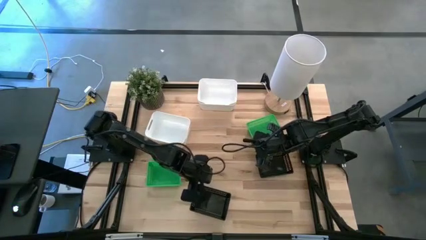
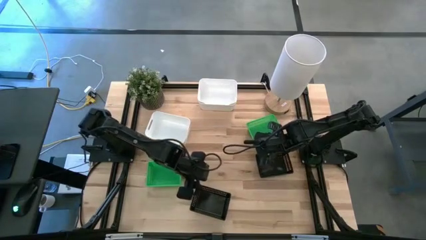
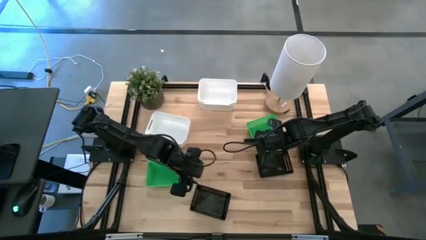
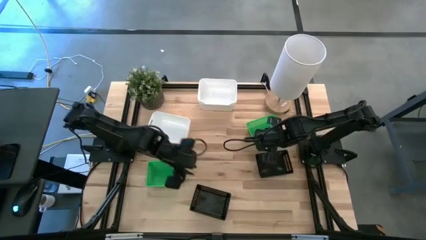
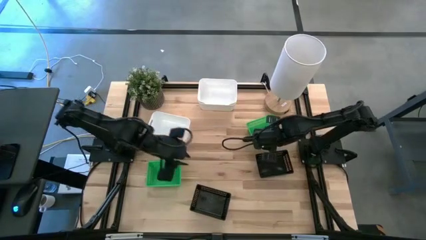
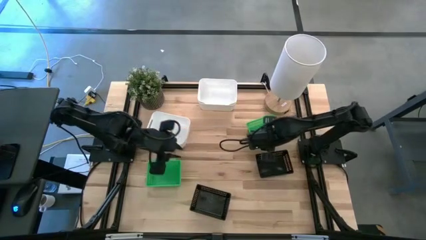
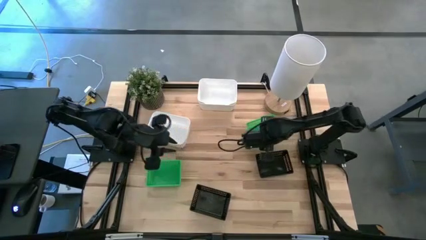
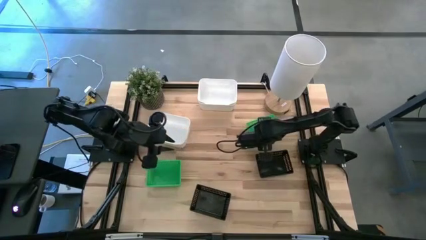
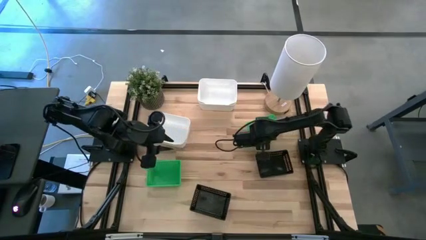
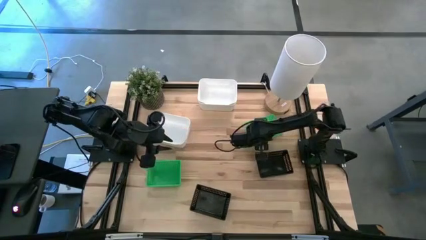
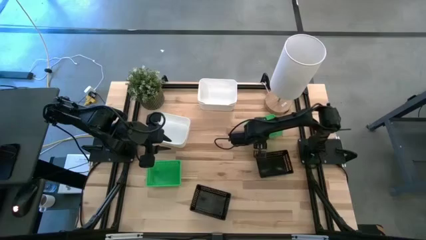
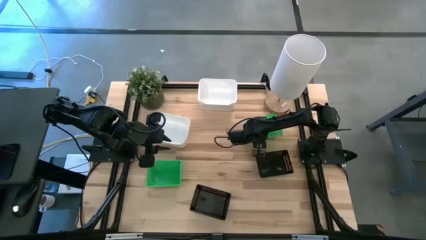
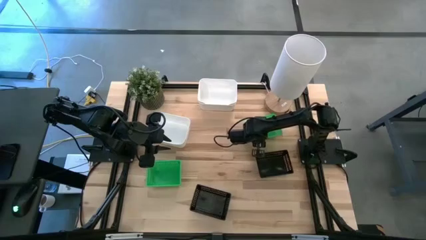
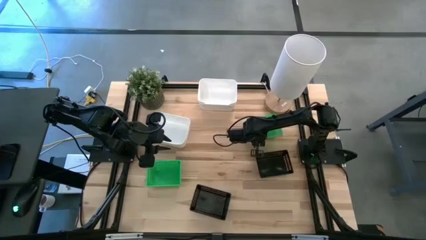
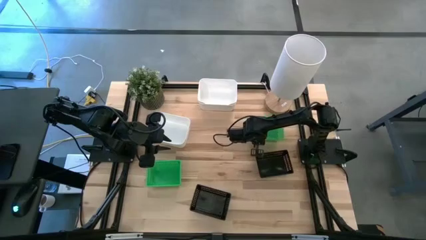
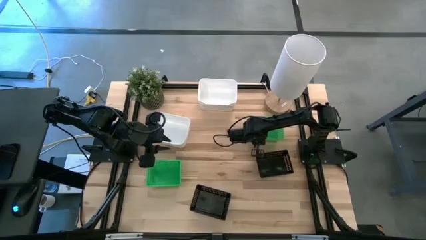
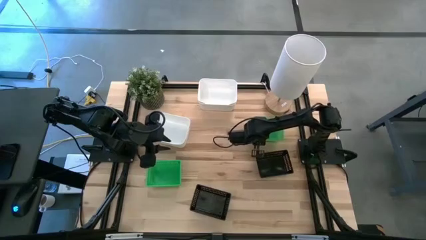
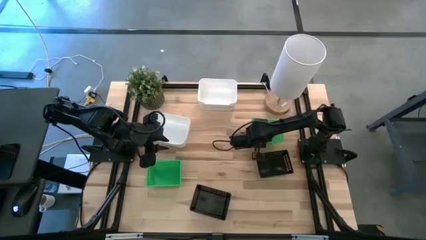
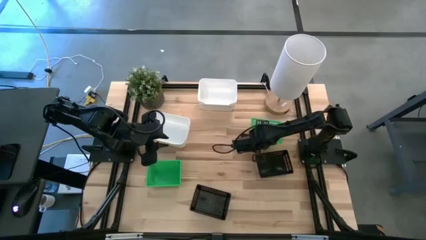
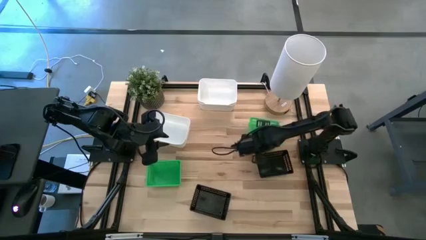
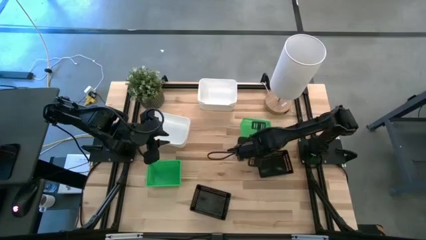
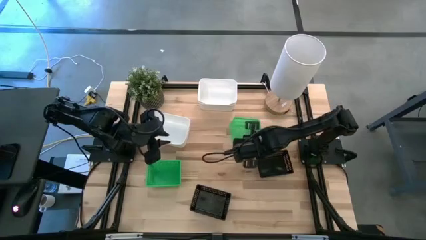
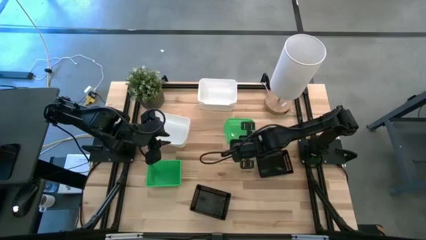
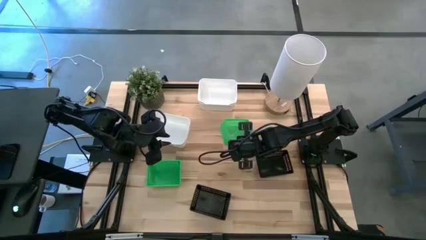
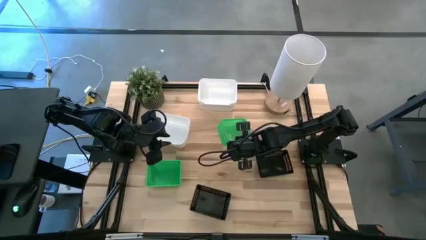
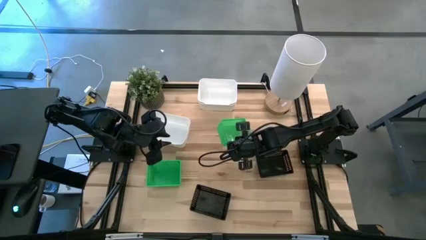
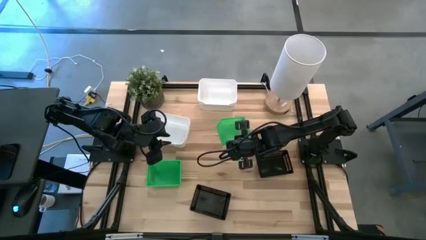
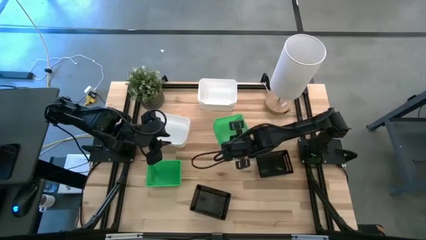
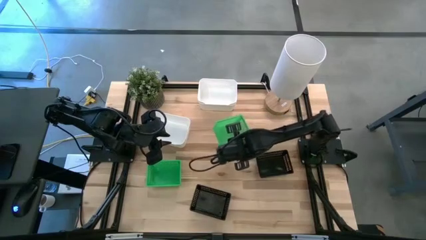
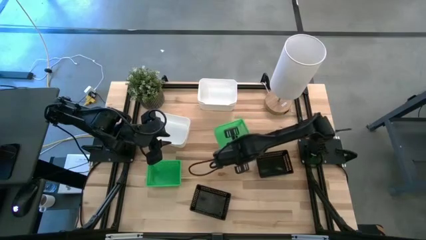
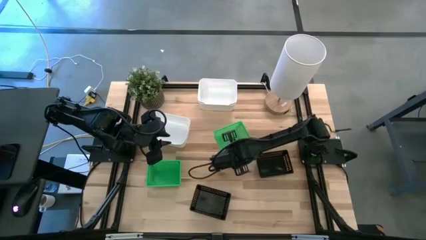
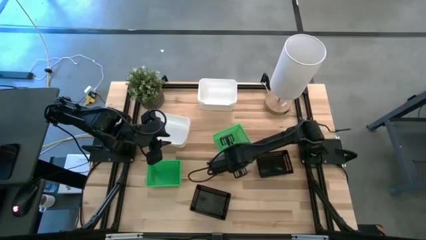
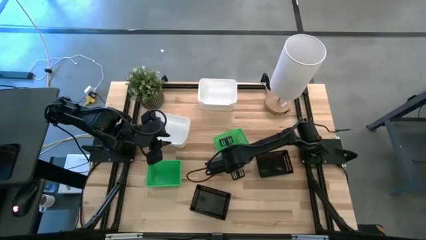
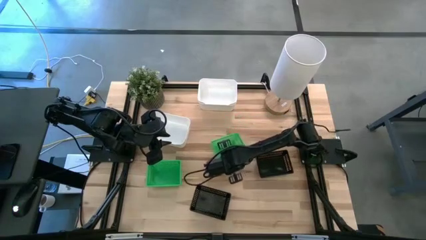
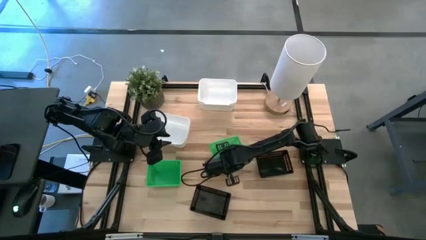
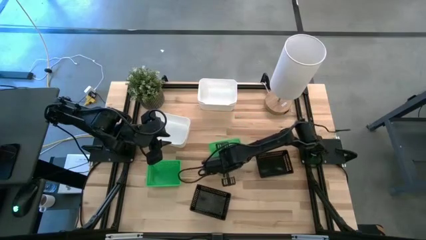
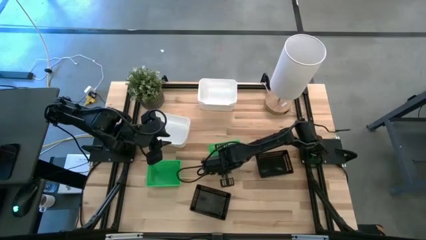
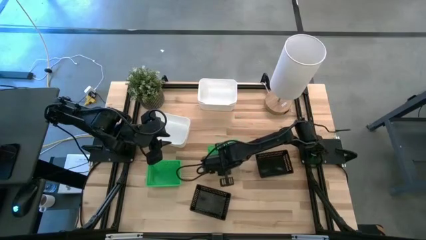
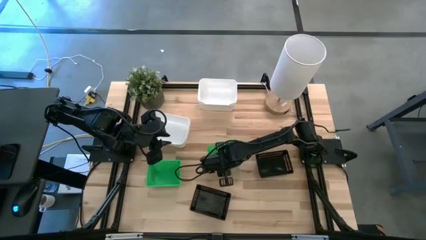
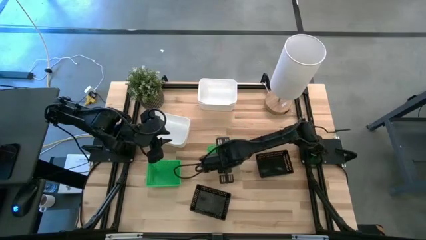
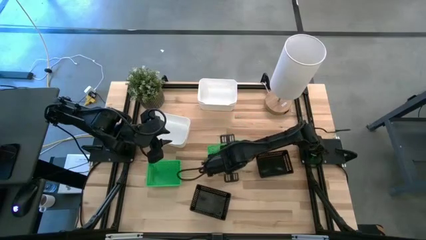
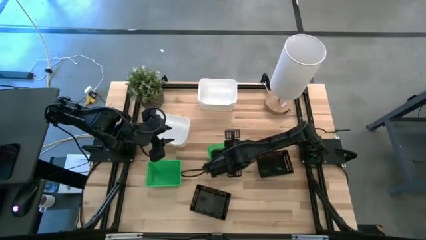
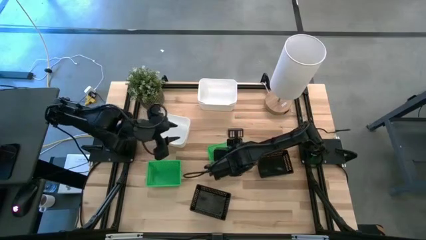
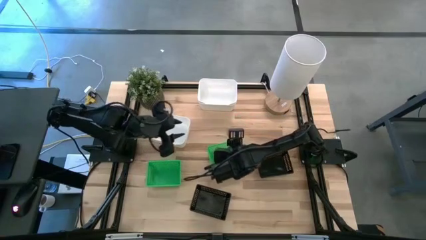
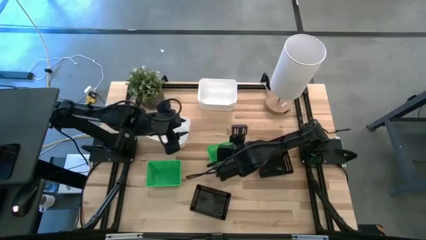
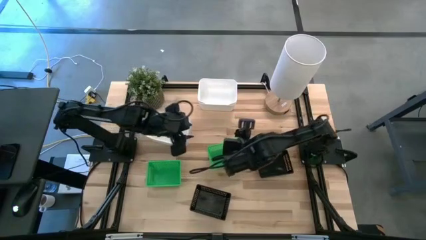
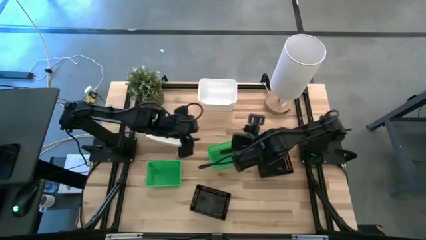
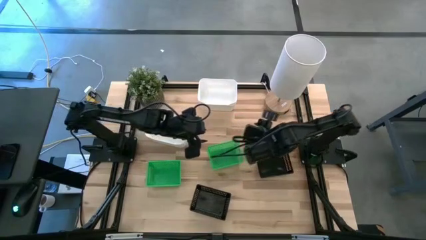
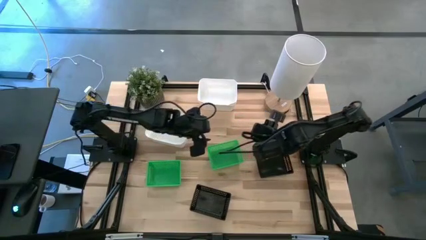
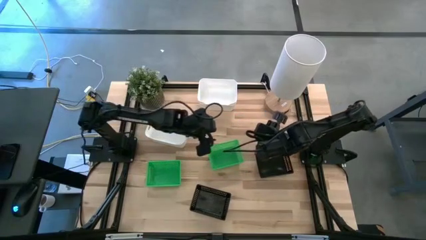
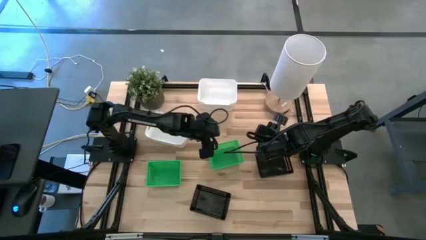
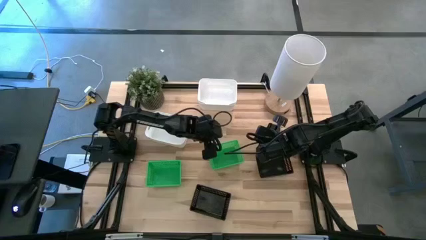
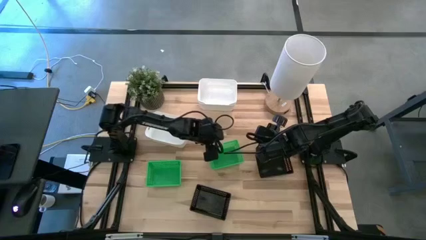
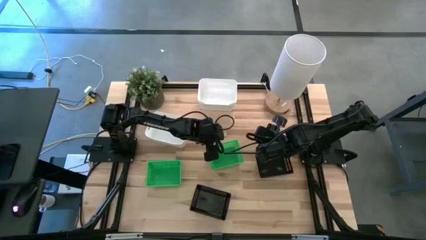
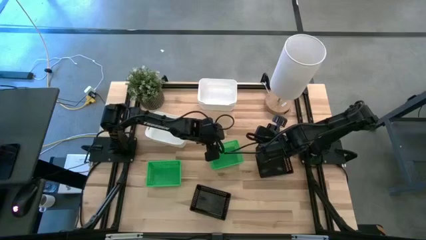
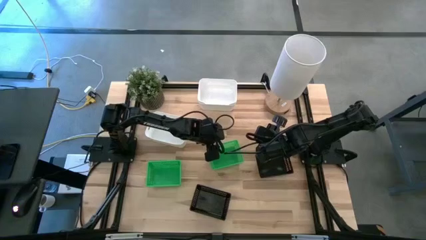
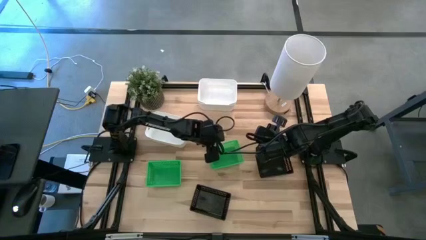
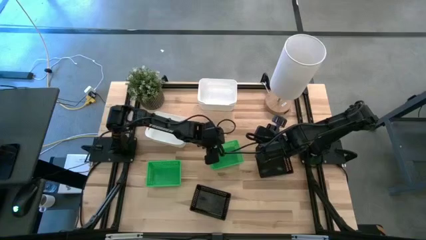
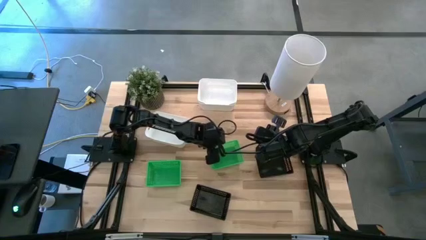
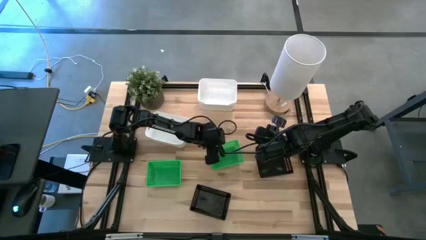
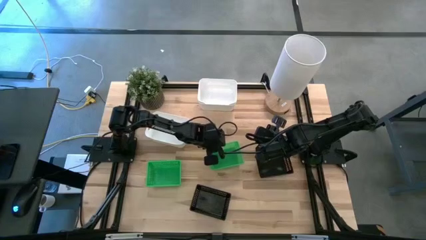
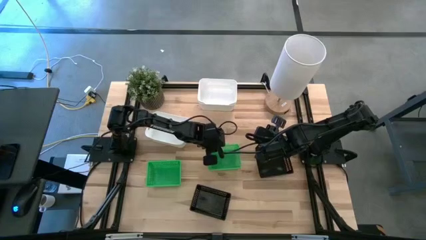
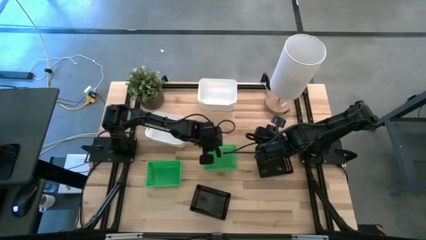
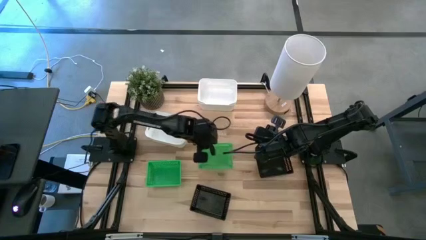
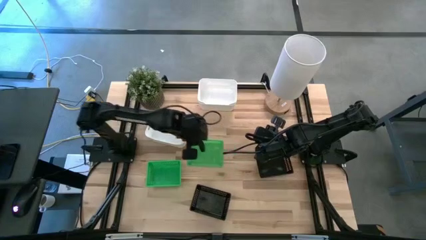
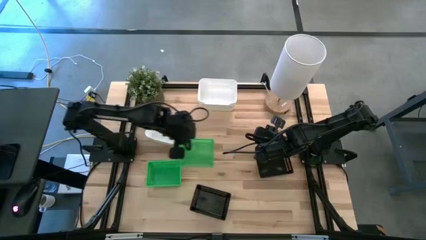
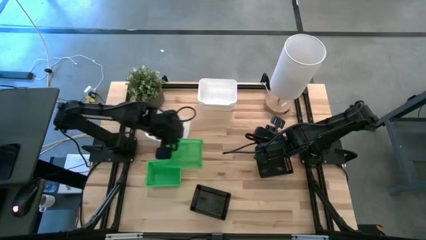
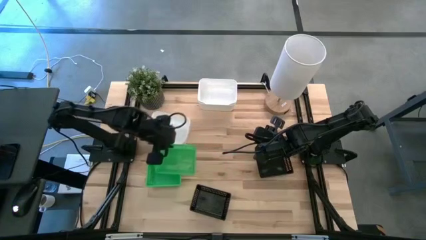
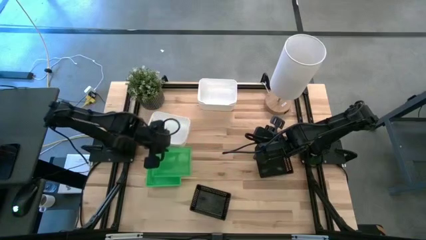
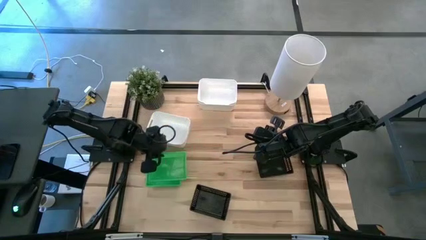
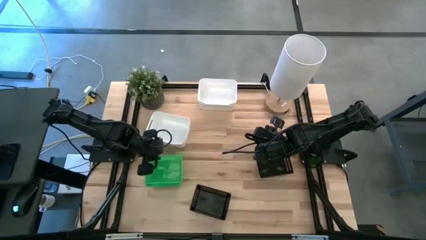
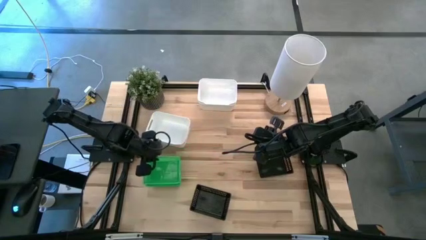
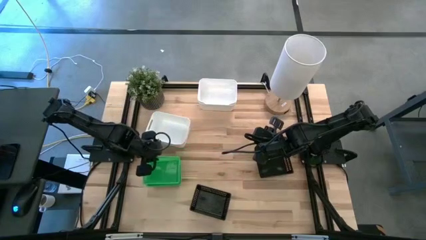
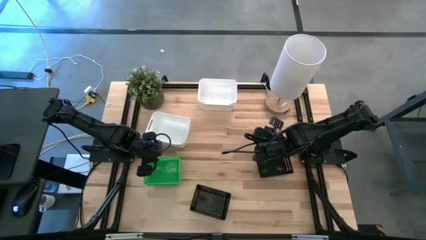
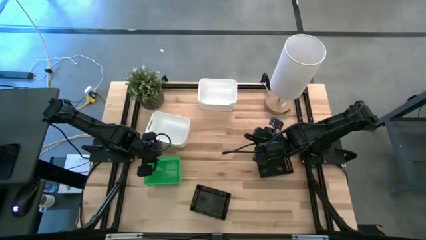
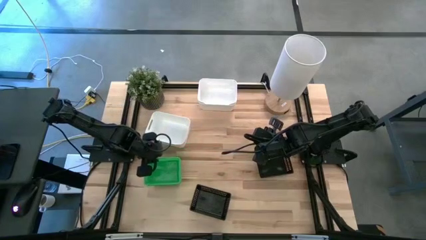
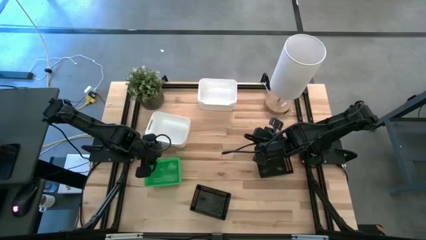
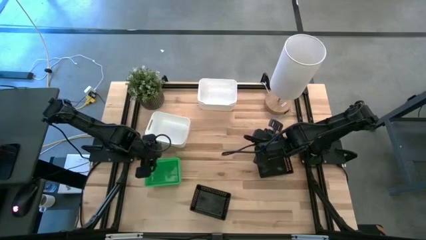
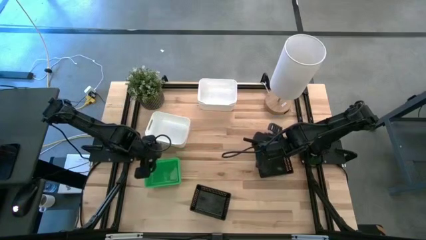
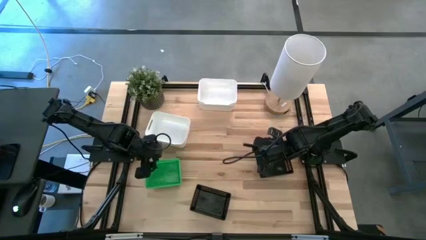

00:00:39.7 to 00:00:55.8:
Stack the right green bin on the left green bin
